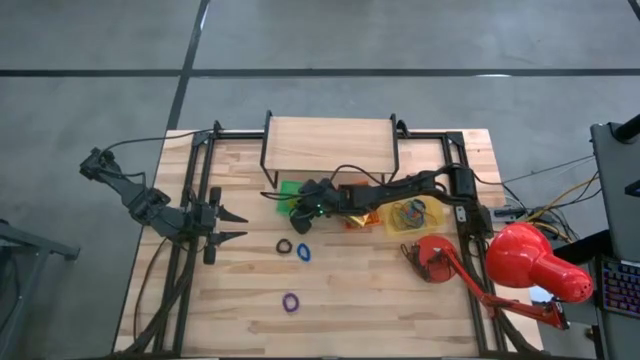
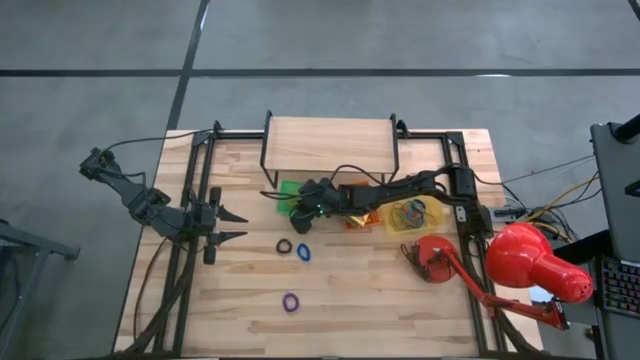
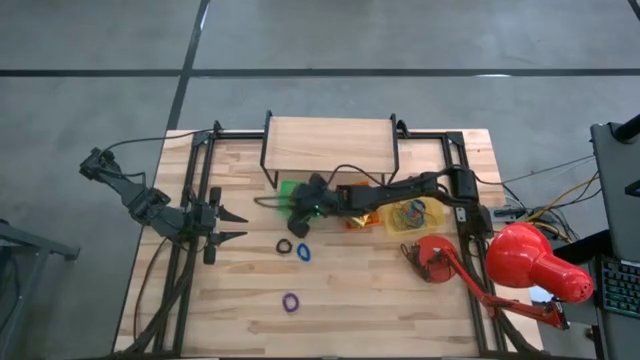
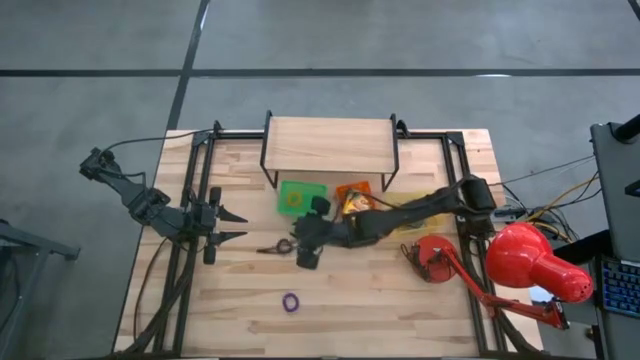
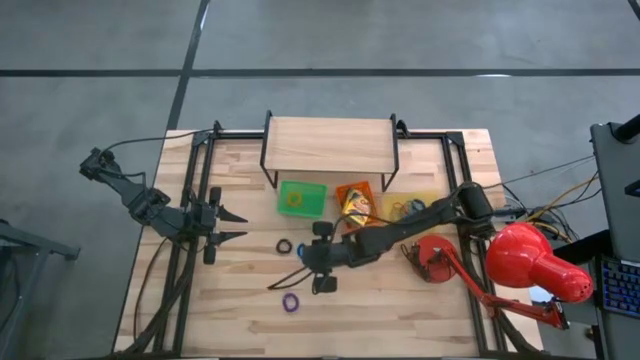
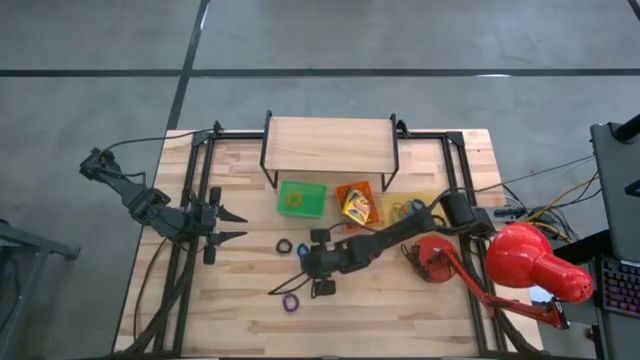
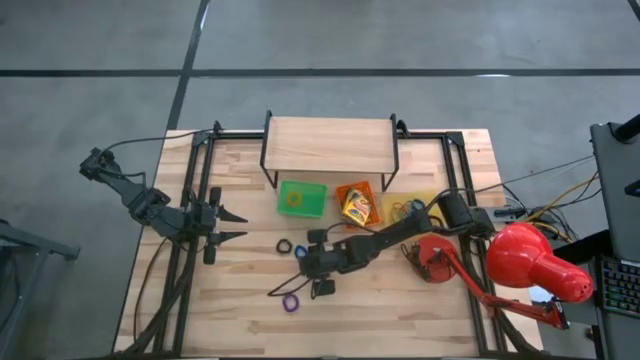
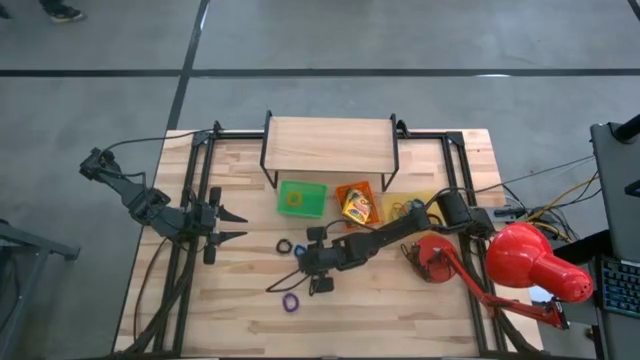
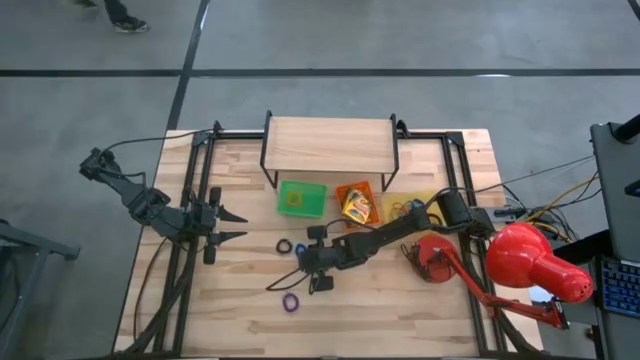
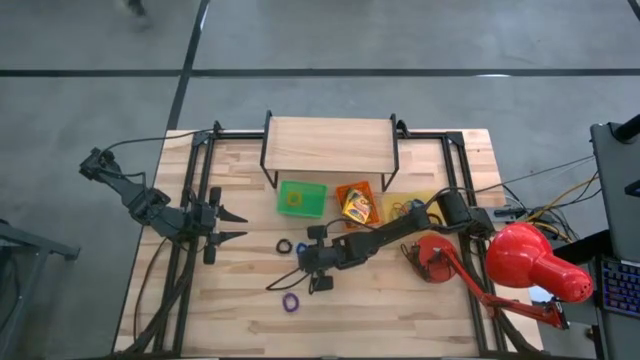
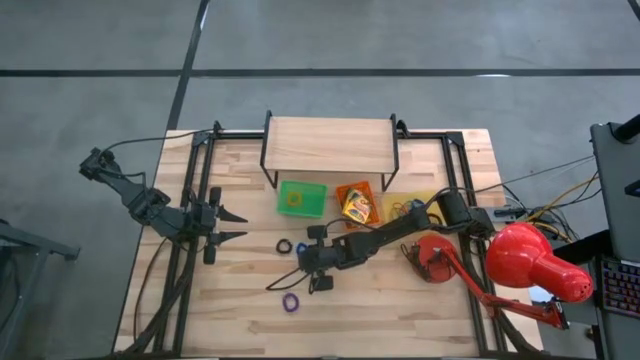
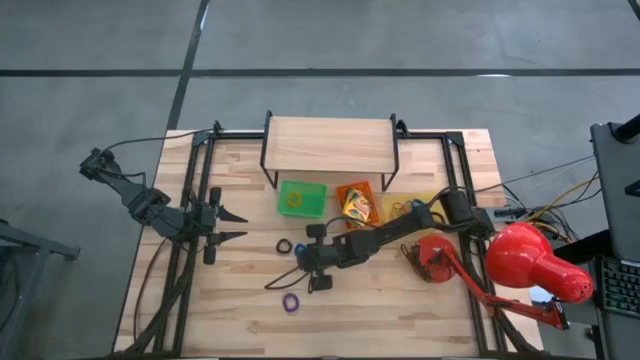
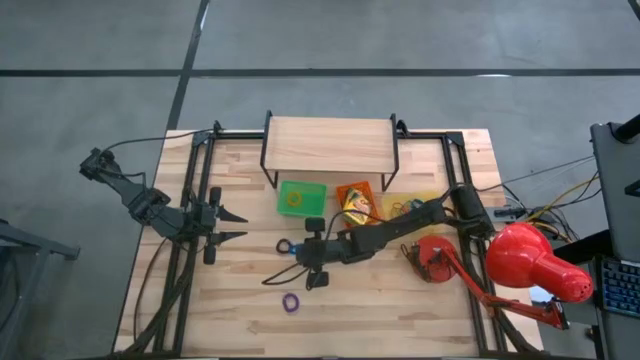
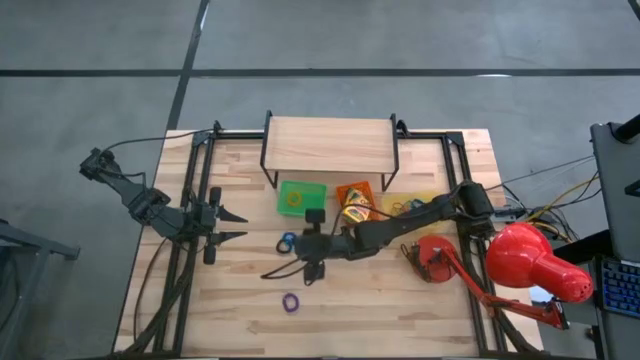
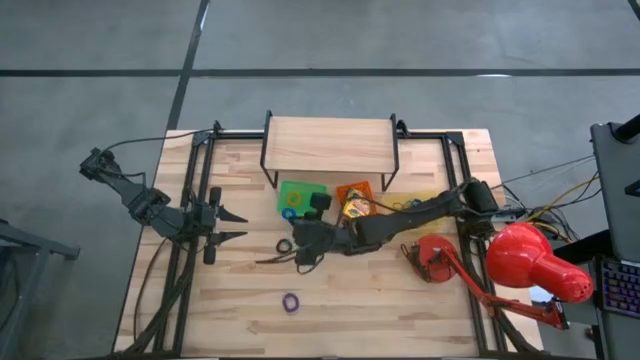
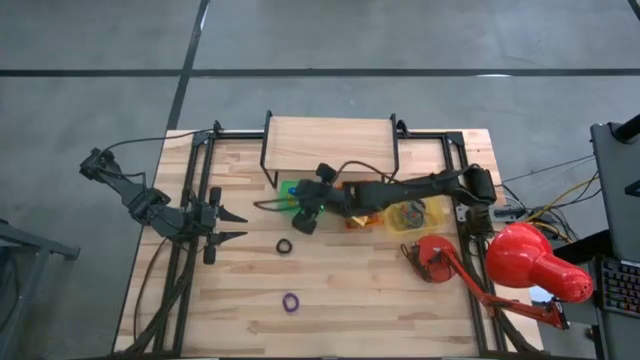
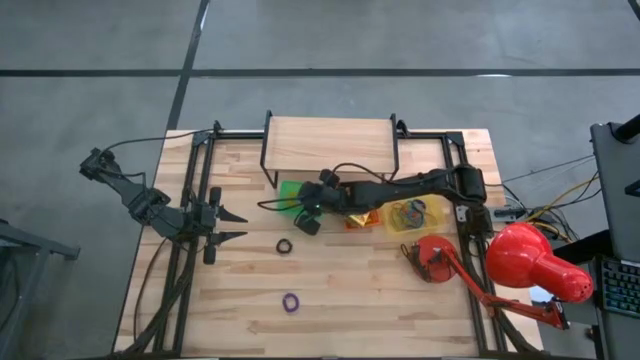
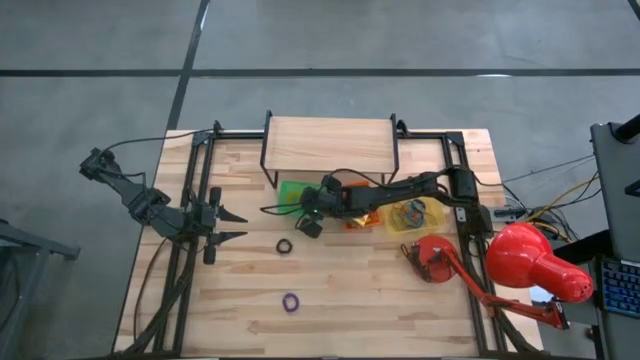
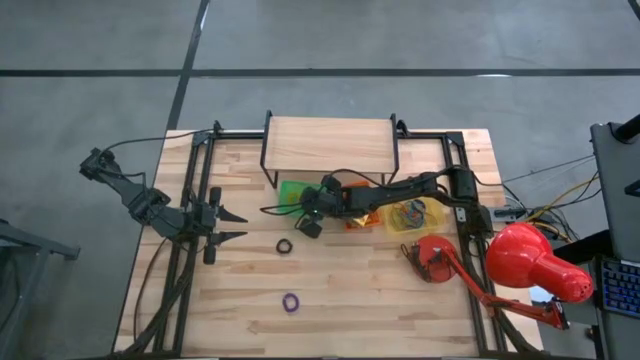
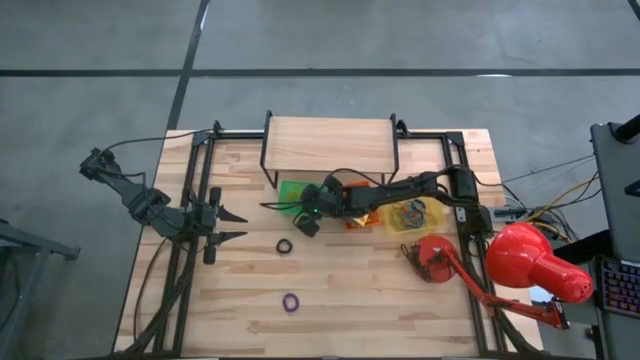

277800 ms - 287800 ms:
Task: Pick & Place Office Desk Supplies
Put the blue spring rubber band into the green bin

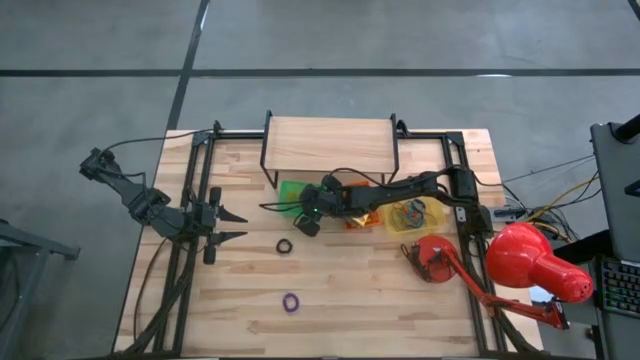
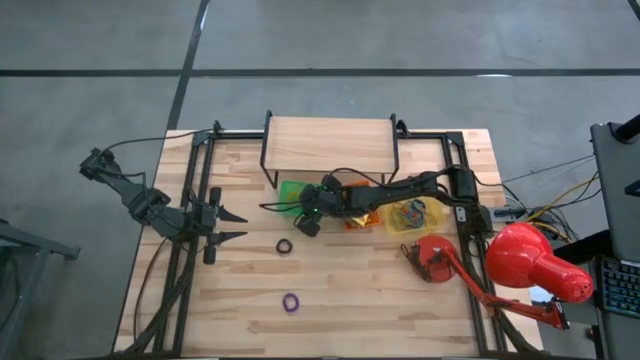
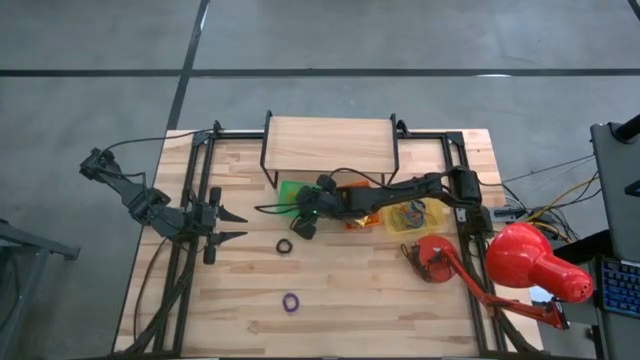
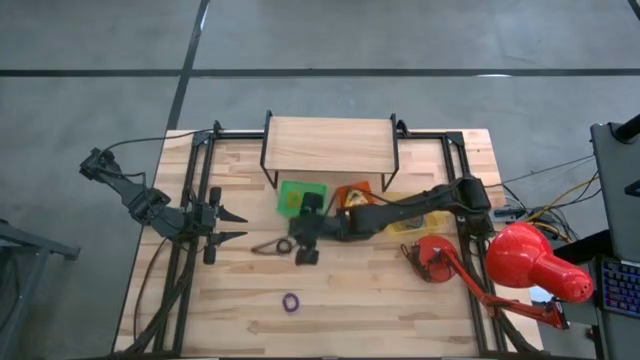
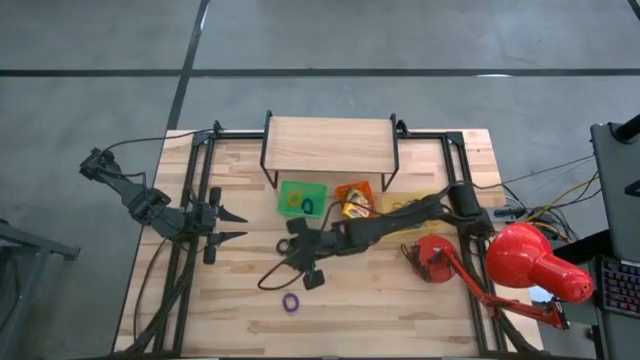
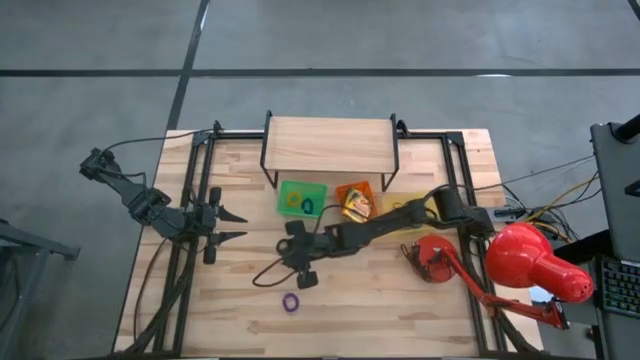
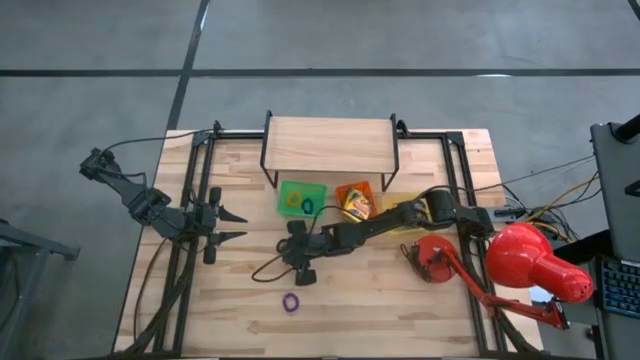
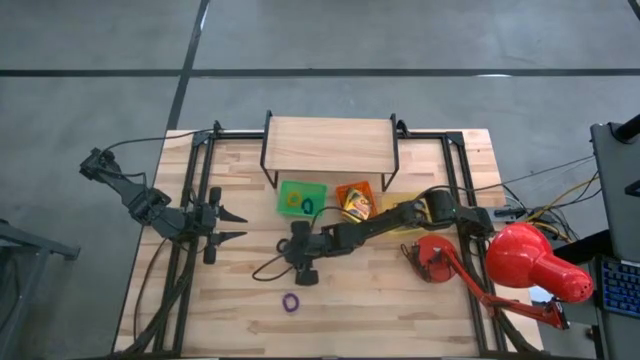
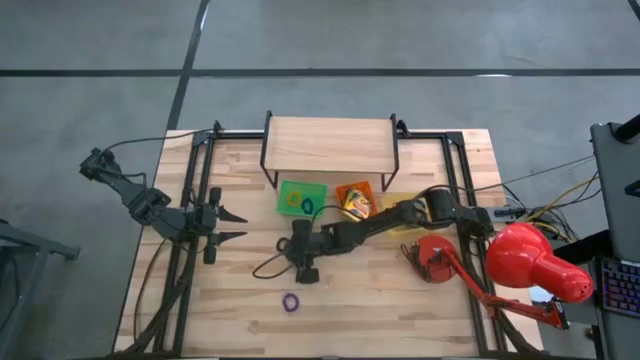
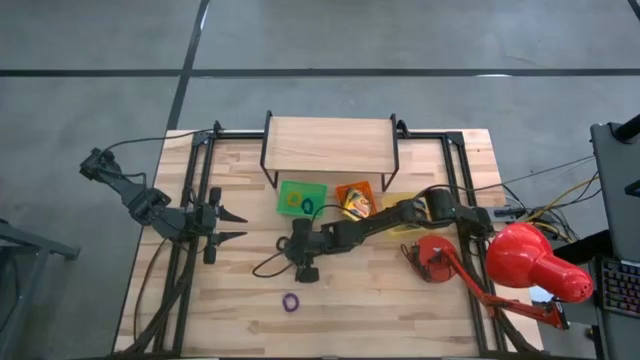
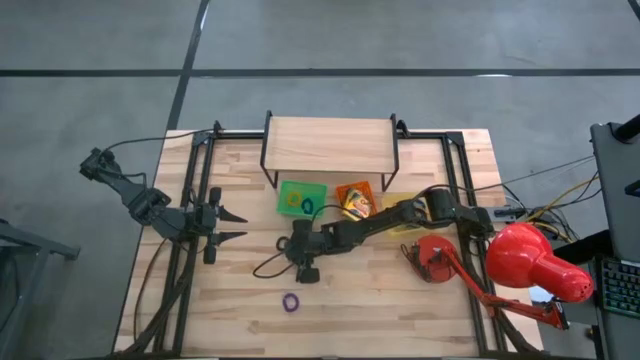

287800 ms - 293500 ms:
Put the black spring rubber band into the green bin

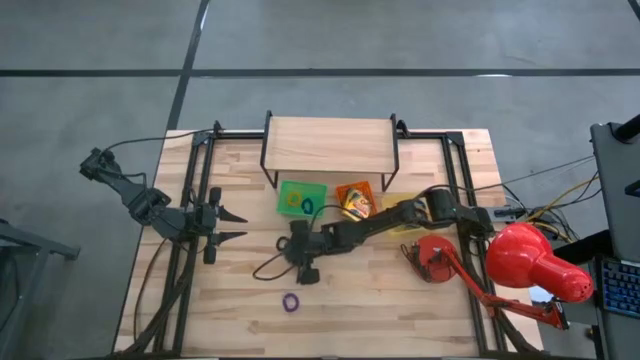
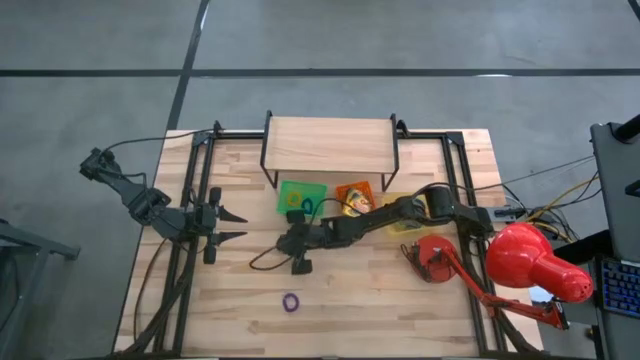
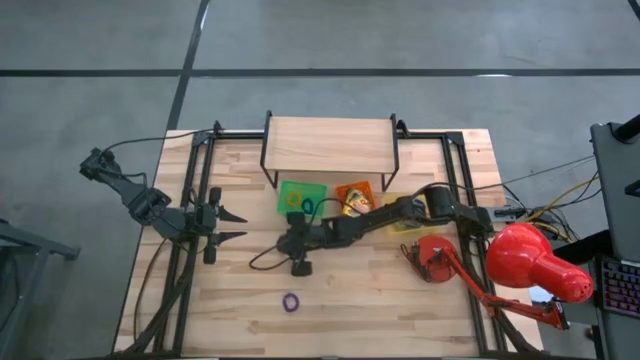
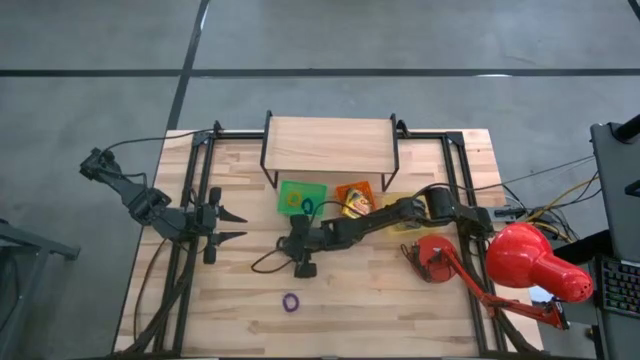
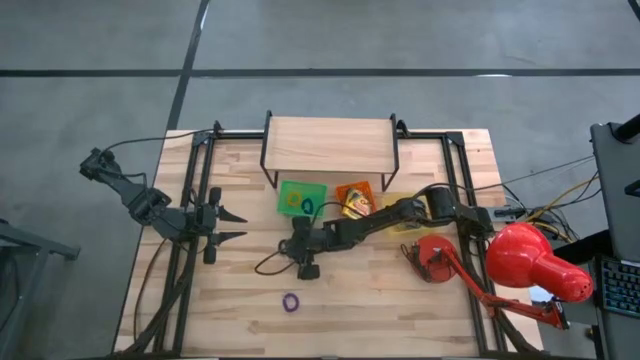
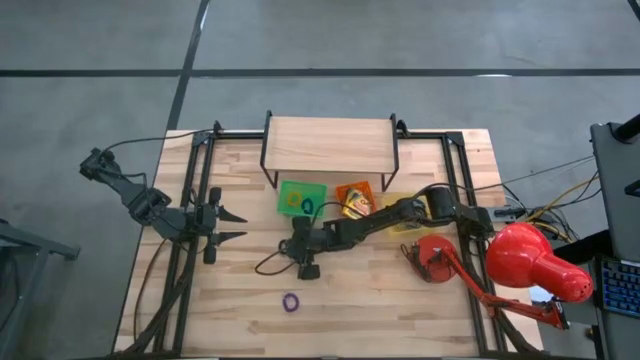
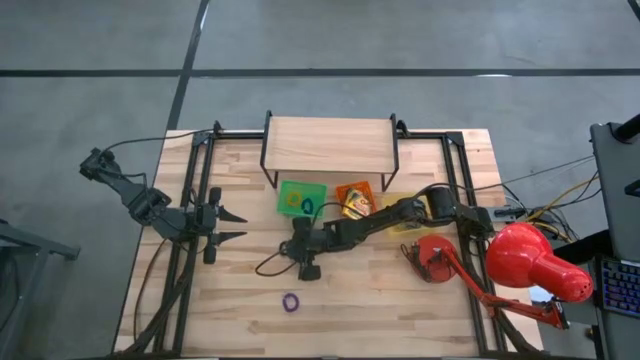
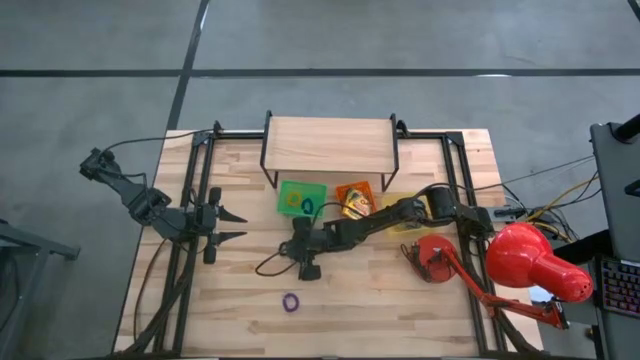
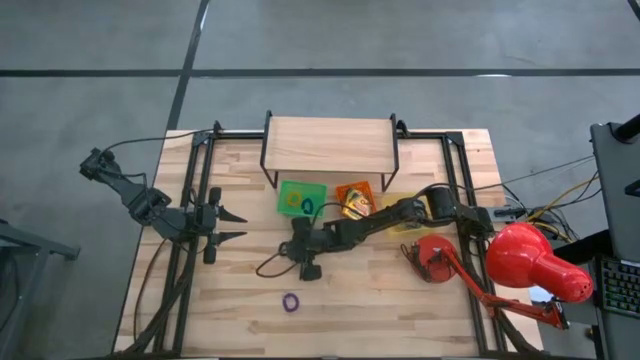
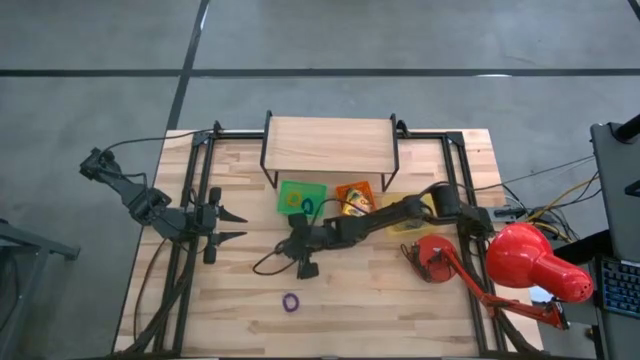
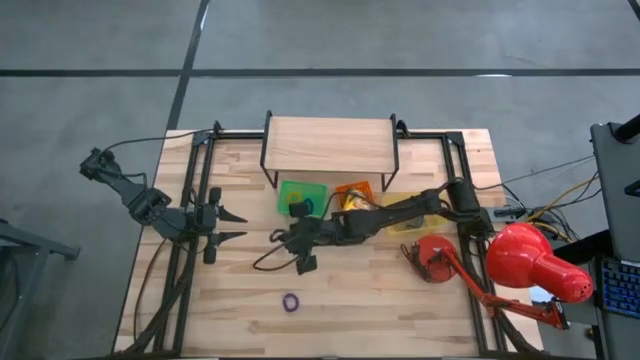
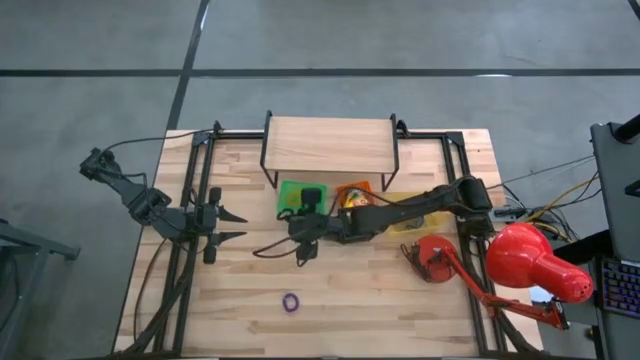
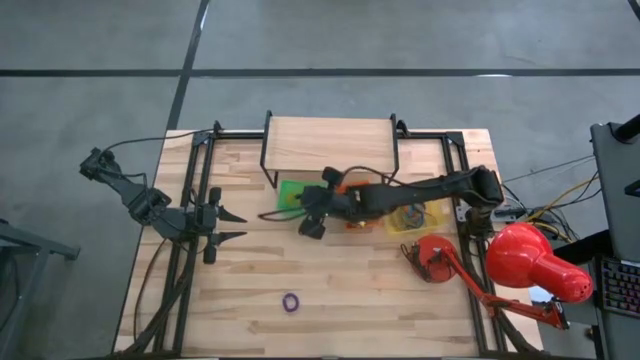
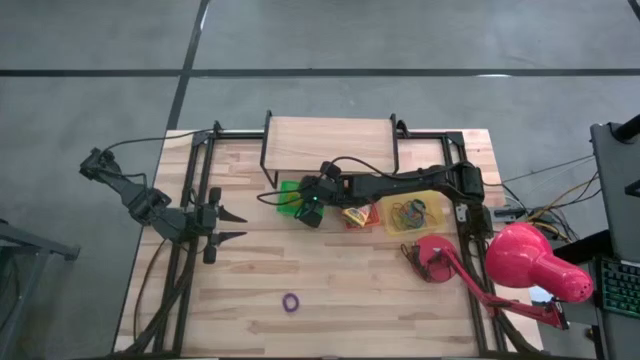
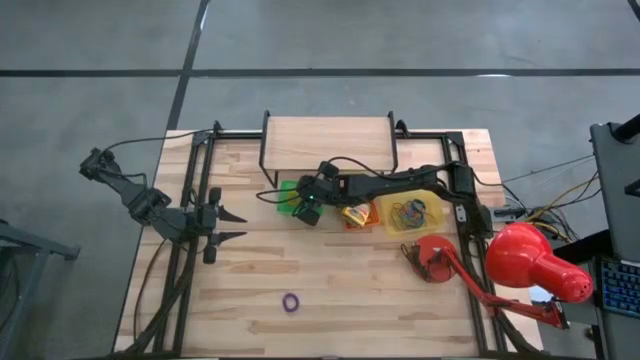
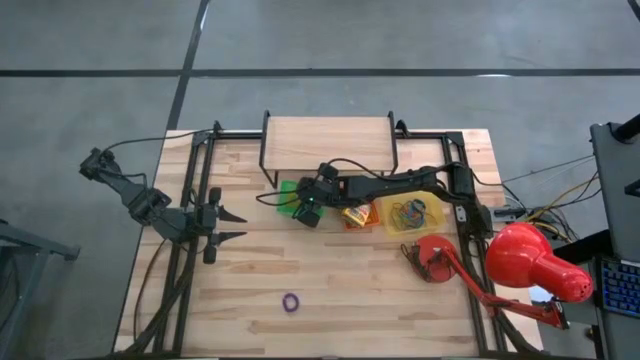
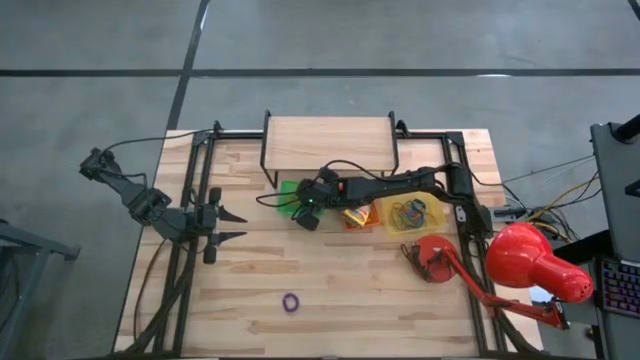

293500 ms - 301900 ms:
Put the black spring rubber band into the green bin
